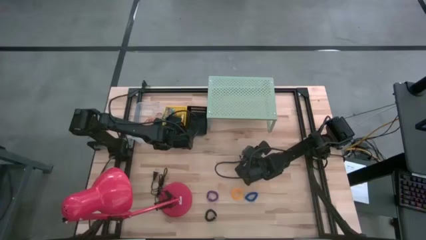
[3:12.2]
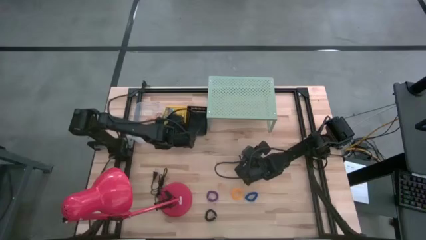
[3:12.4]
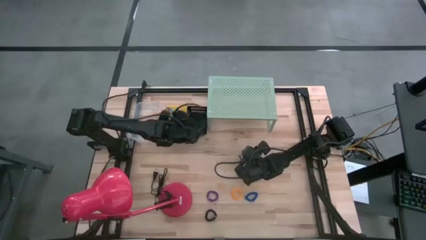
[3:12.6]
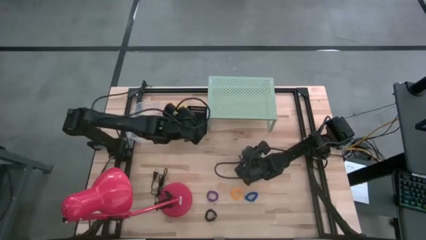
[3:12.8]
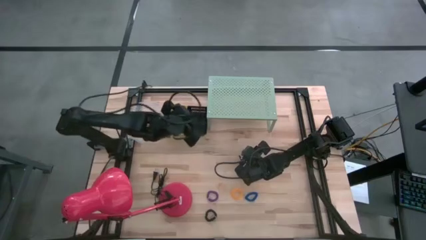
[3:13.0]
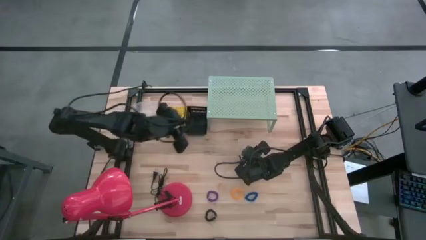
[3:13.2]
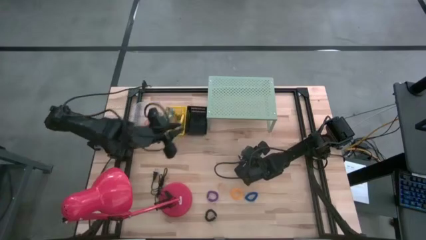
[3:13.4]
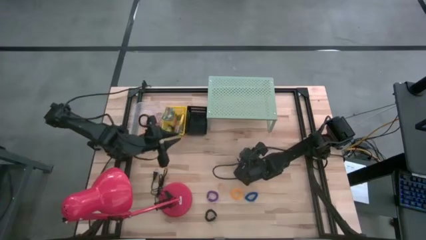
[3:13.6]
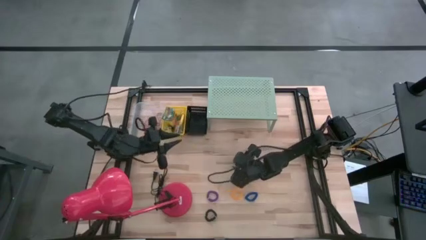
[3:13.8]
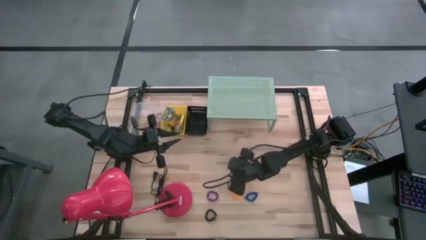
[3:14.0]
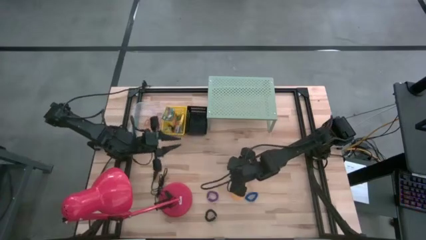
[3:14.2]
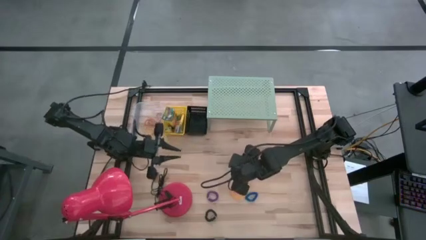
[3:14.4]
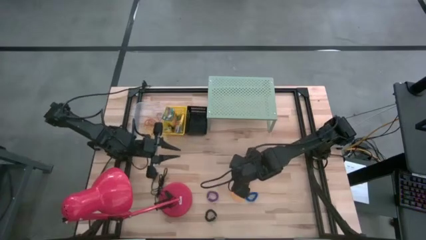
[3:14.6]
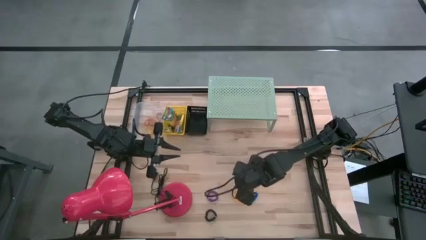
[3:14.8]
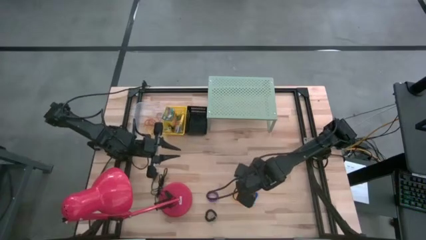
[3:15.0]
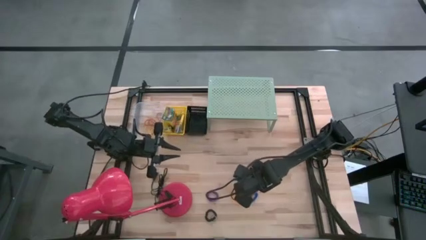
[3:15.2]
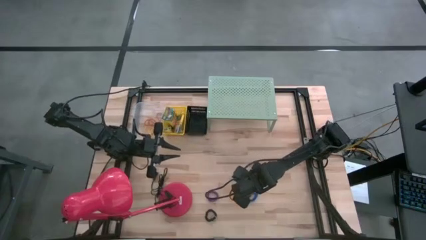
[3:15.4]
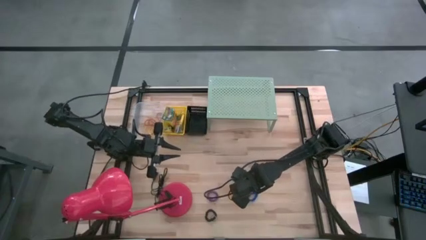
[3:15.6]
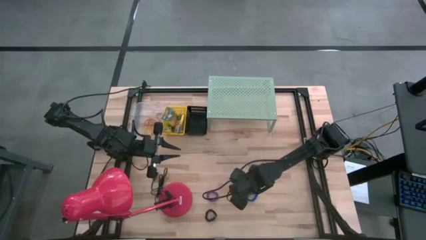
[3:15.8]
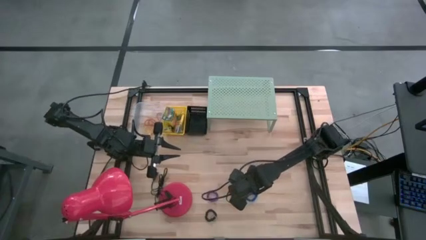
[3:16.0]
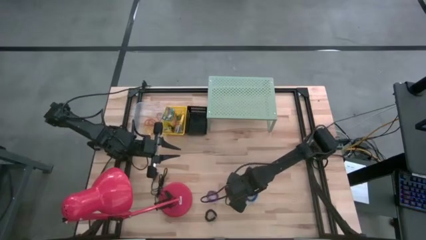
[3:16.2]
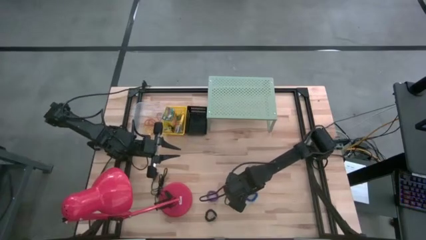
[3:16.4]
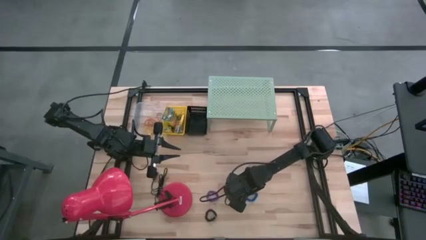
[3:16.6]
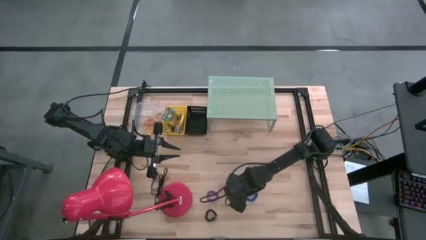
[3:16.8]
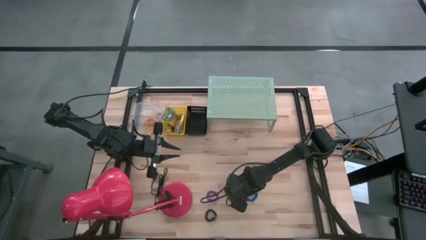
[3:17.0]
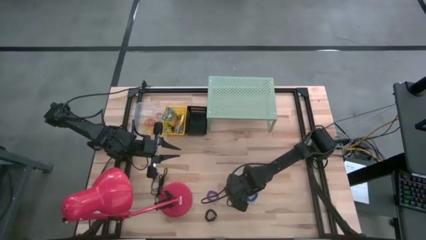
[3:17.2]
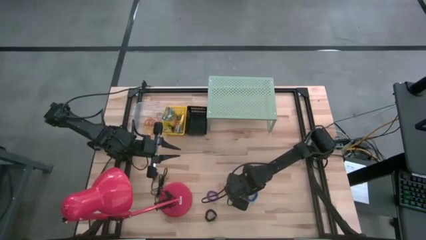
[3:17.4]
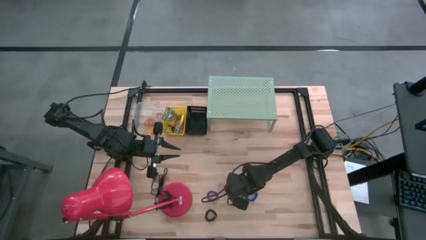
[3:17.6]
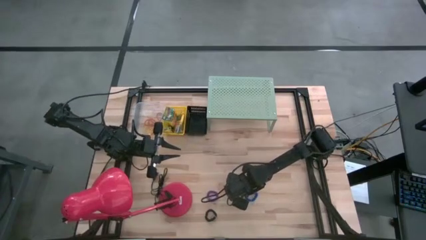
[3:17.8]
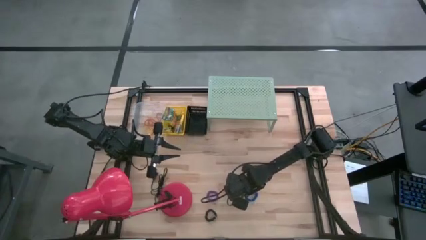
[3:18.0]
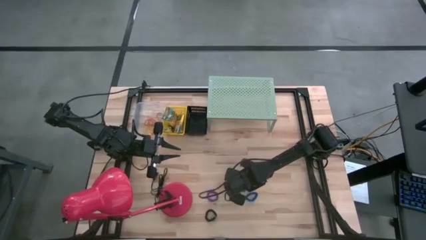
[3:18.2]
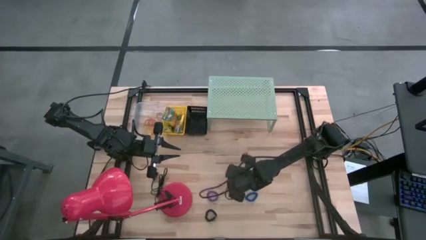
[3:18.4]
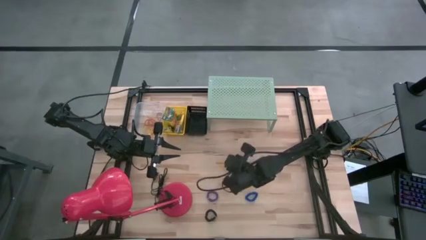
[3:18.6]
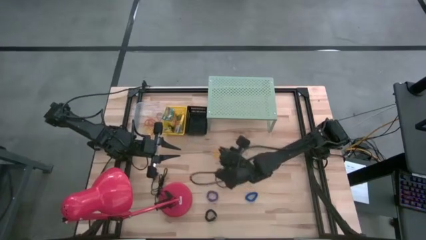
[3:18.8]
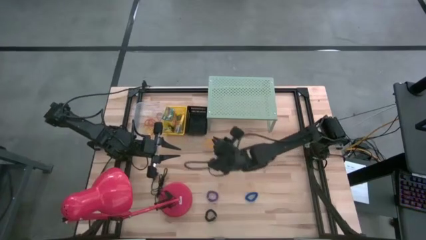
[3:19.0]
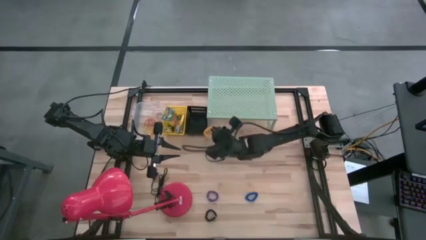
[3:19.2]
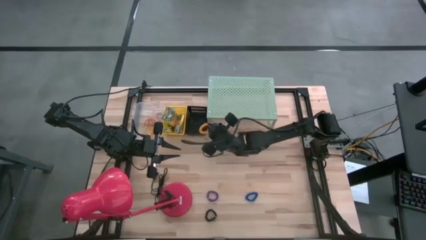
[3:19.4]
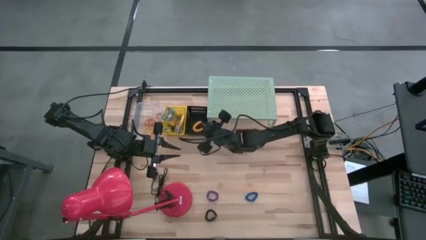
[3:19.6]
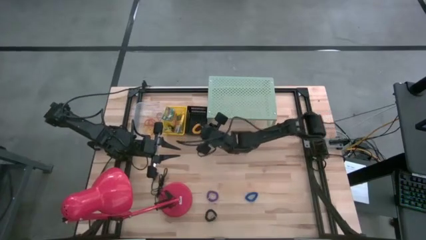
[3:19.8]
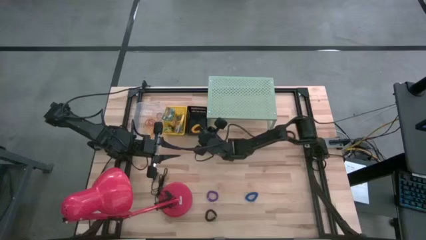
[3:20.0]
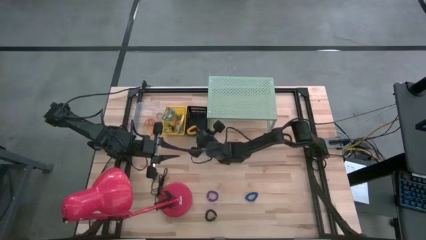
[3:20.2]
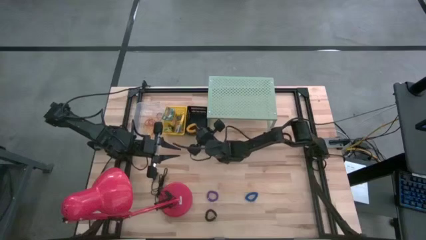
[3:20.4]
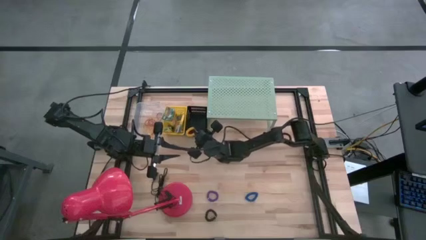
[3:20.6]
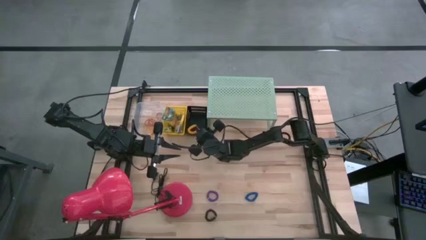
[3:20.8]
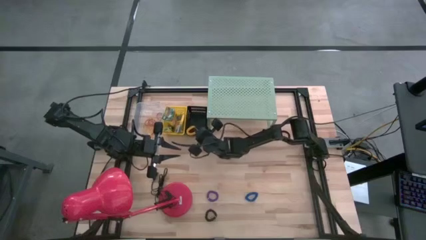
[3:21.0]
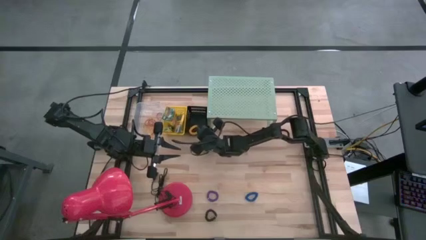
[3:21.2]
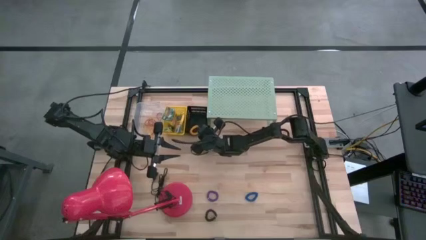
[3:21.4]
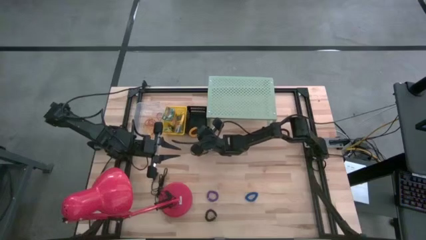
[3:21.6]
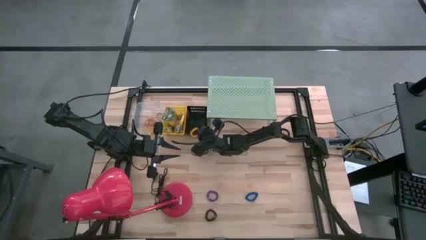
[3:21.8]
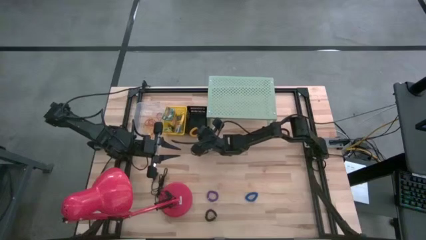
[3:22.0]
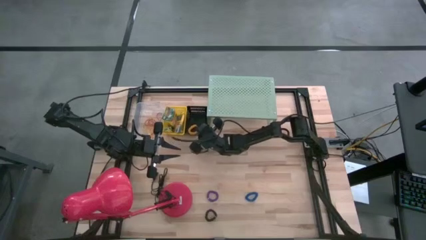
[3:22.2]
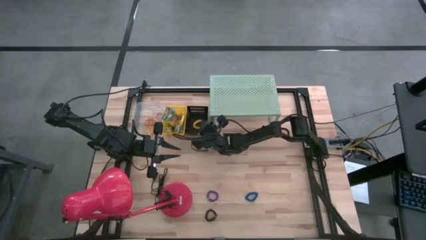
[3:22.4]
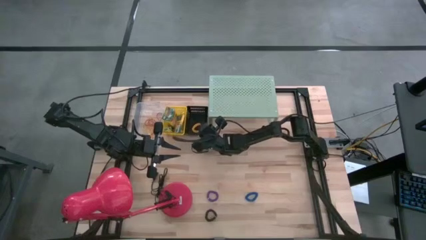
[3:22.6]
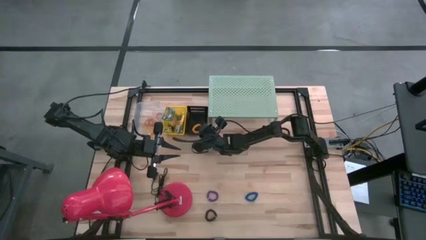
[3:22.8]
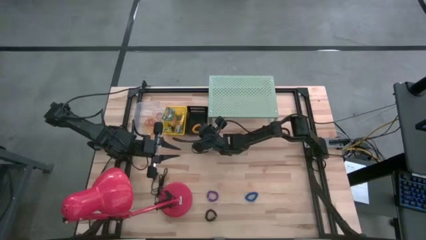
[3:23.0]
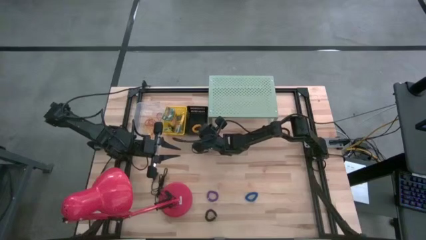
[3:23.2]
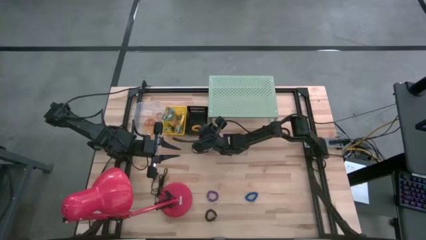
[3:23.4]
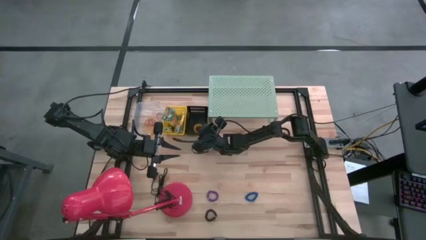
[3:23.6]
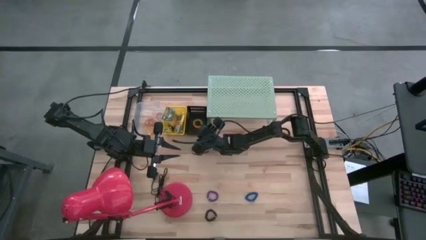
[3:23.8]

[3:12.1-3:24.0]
Task: Pick & Place Office Desk Supplies
Put the yellow spring rubber band into the black bin
